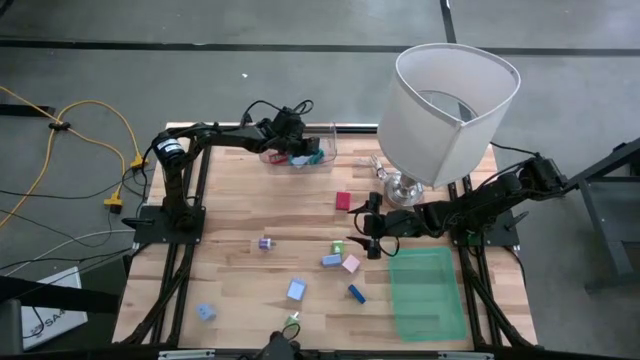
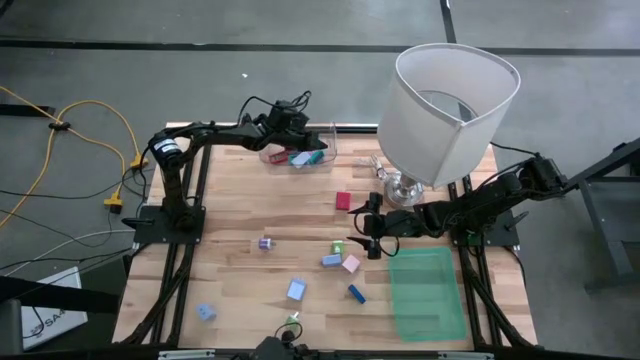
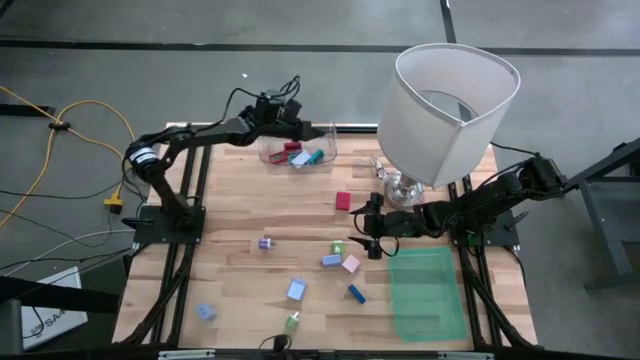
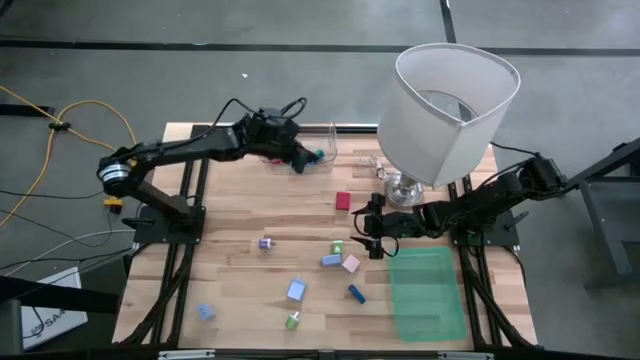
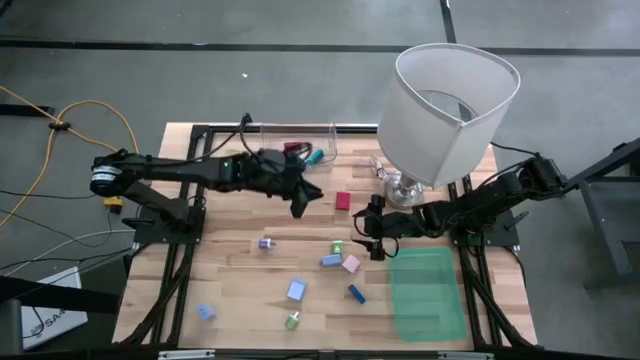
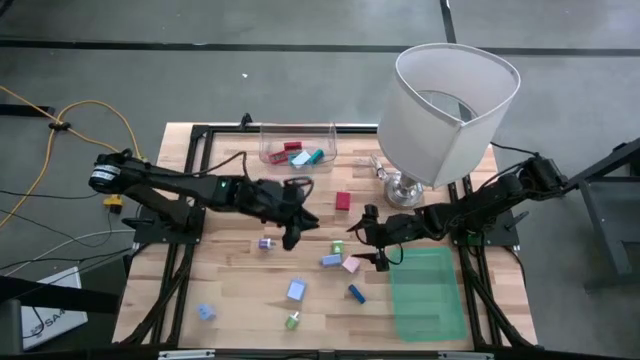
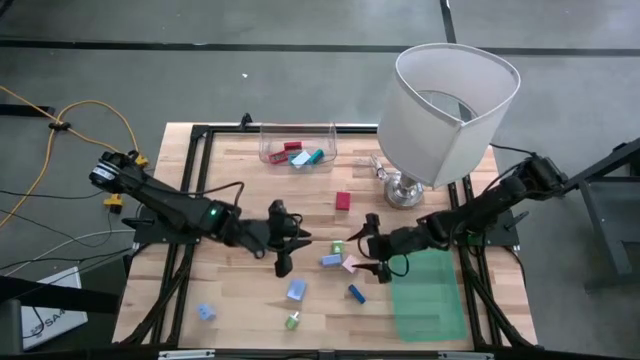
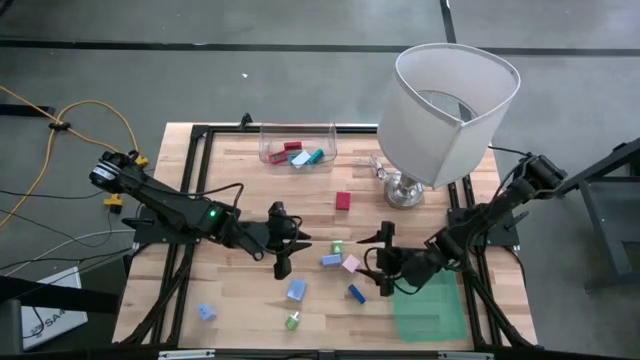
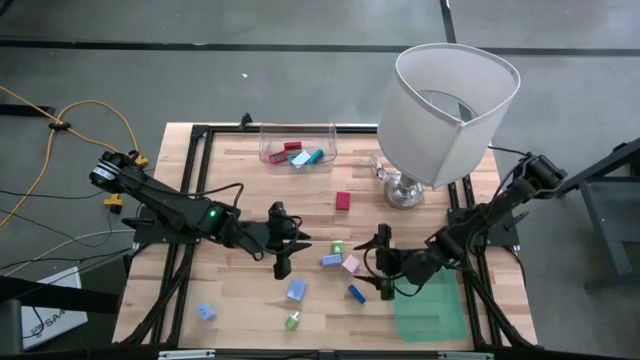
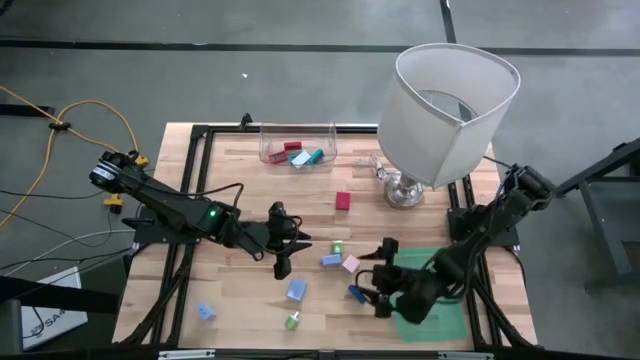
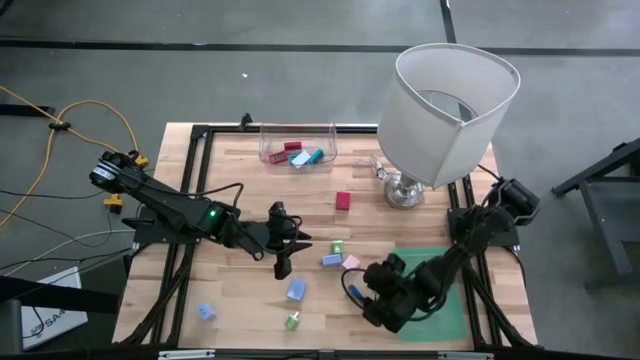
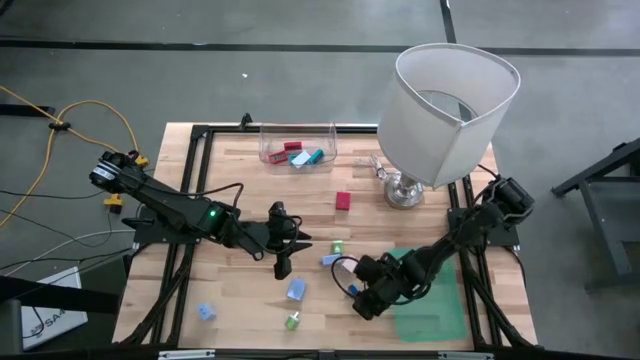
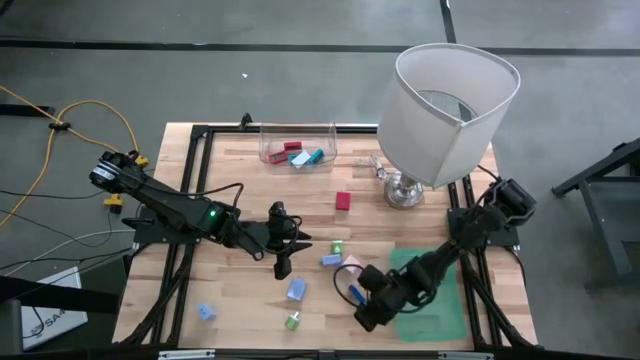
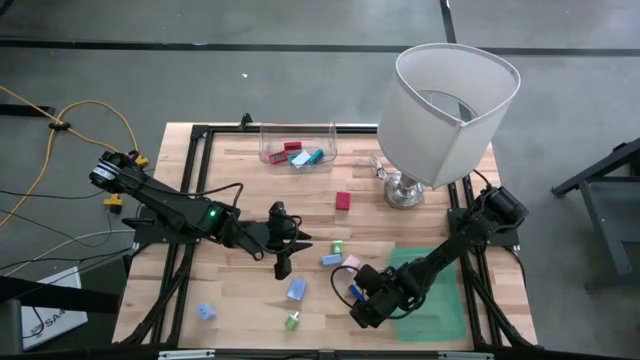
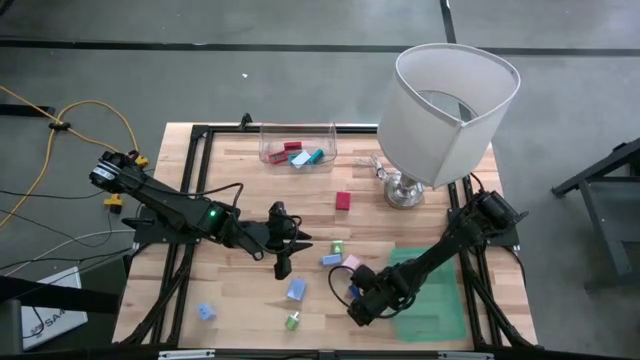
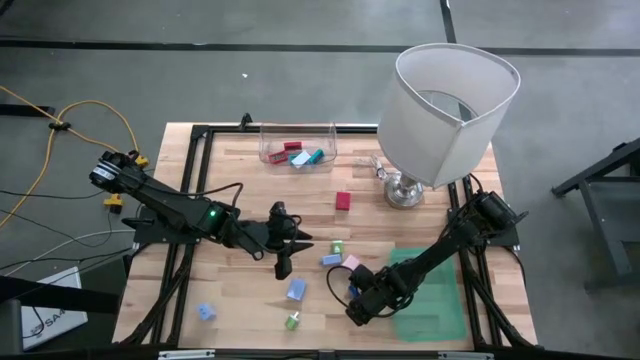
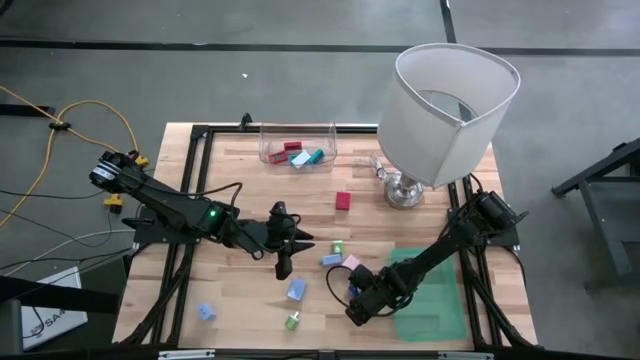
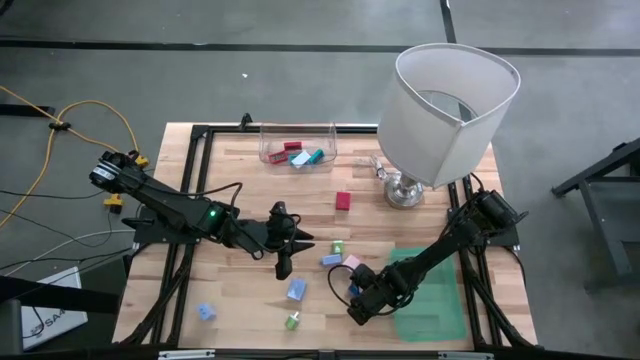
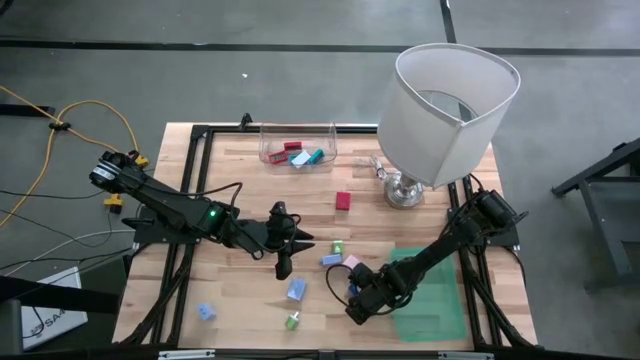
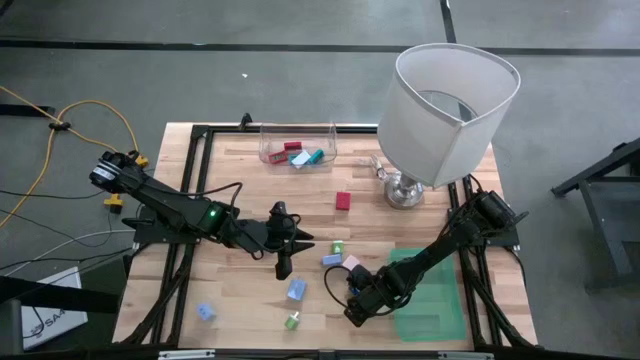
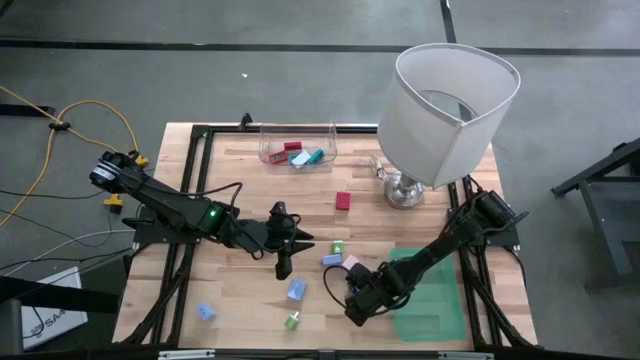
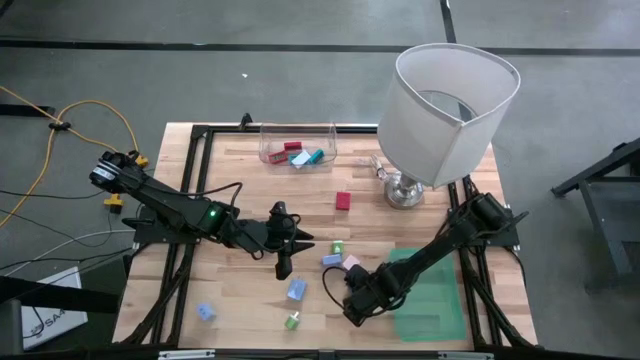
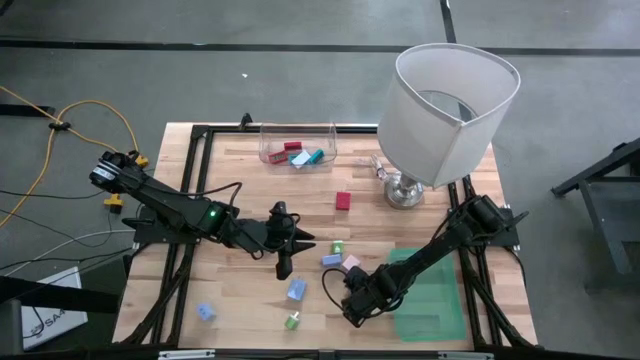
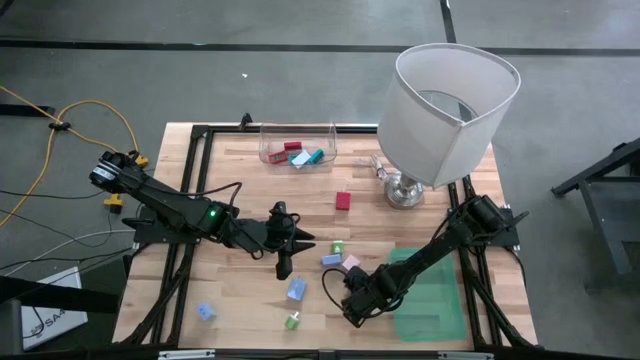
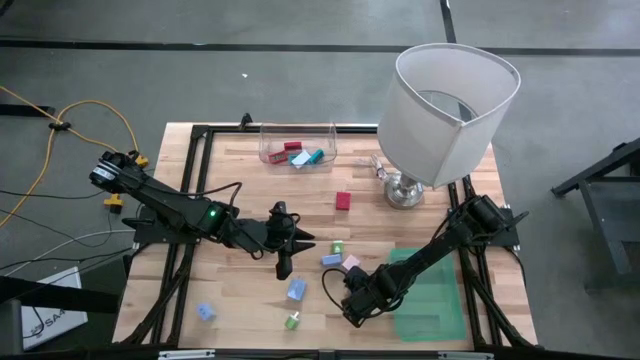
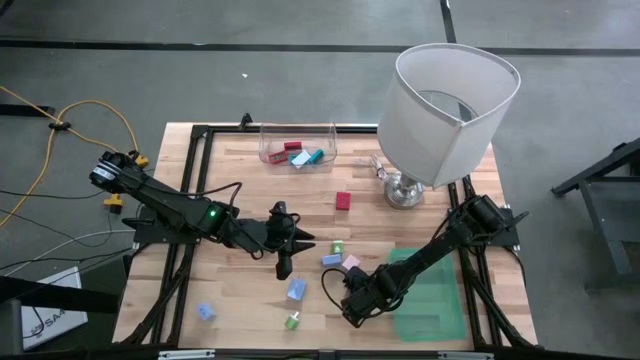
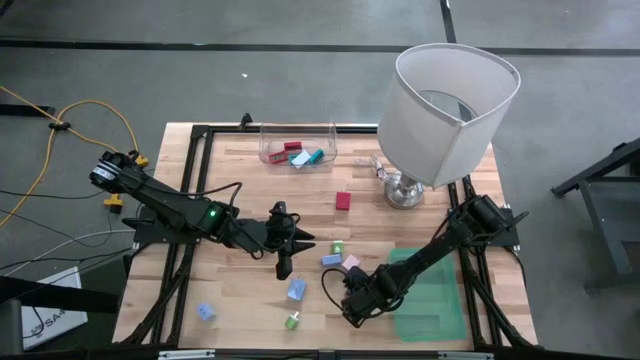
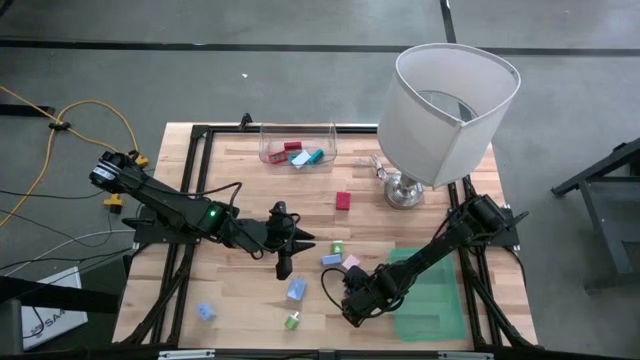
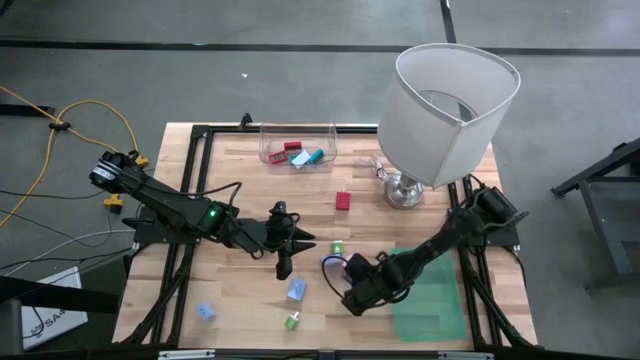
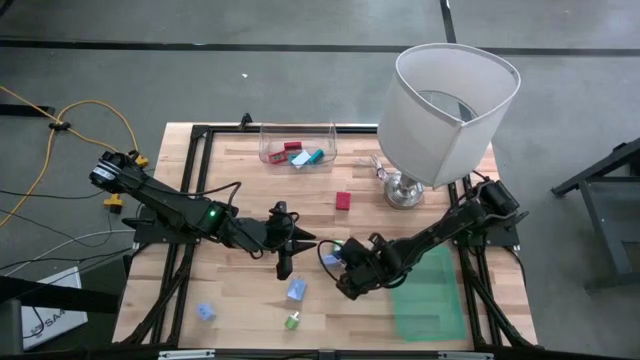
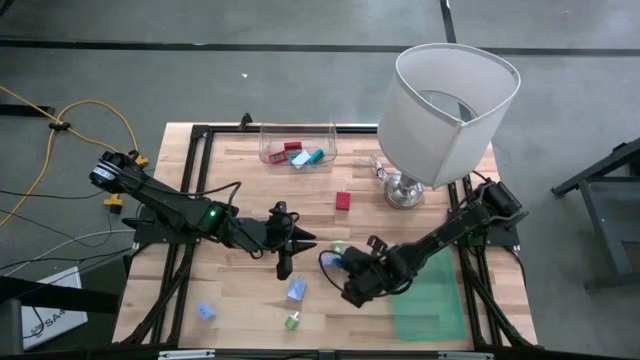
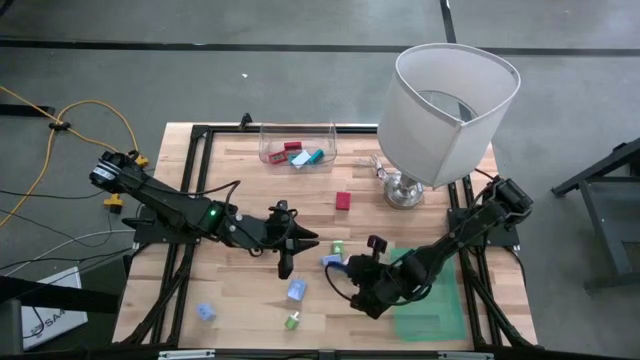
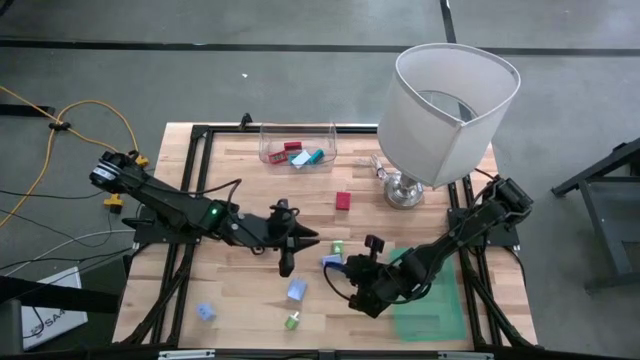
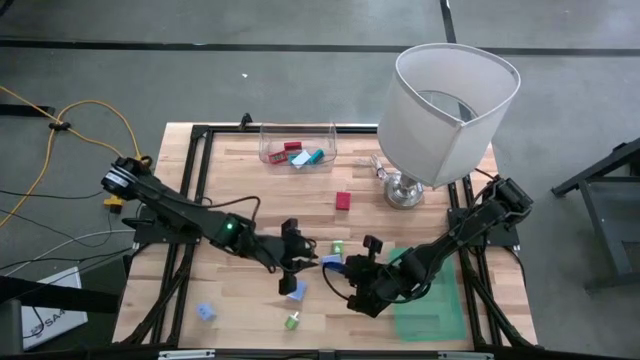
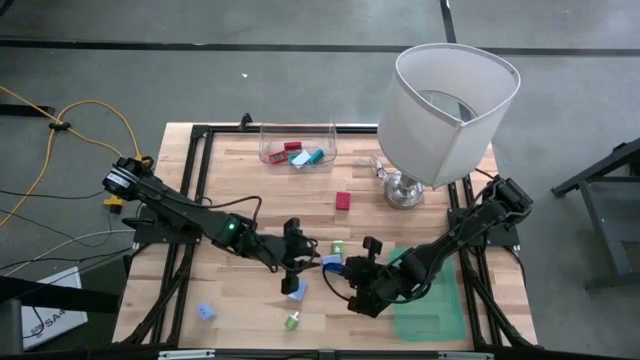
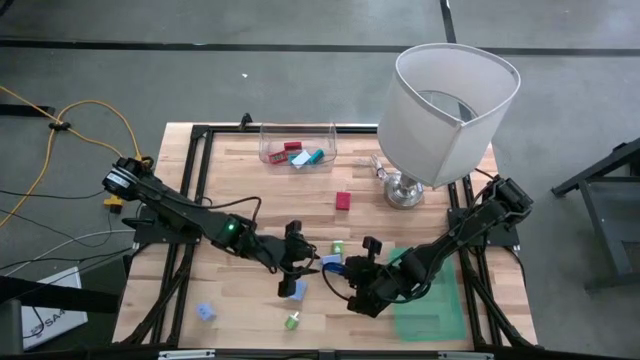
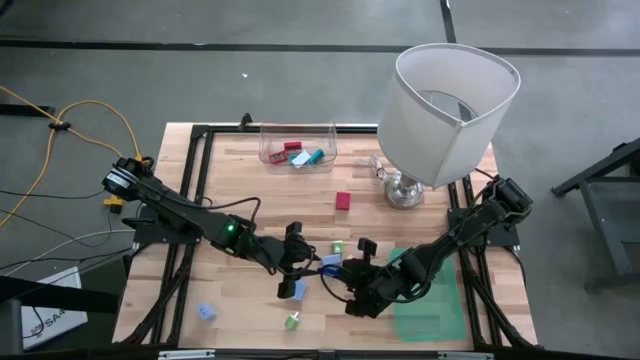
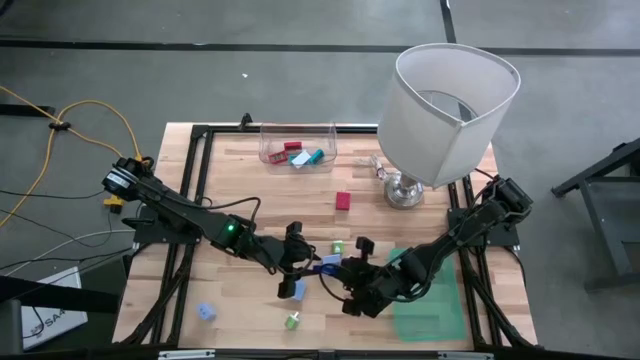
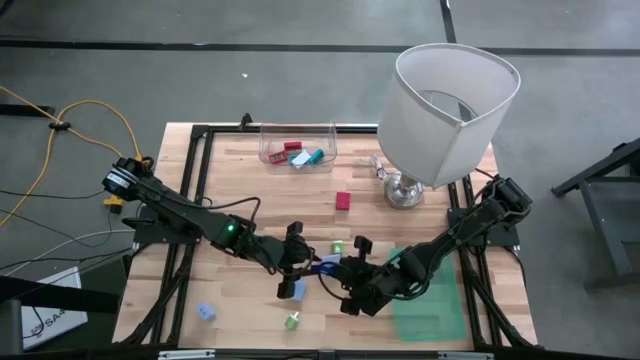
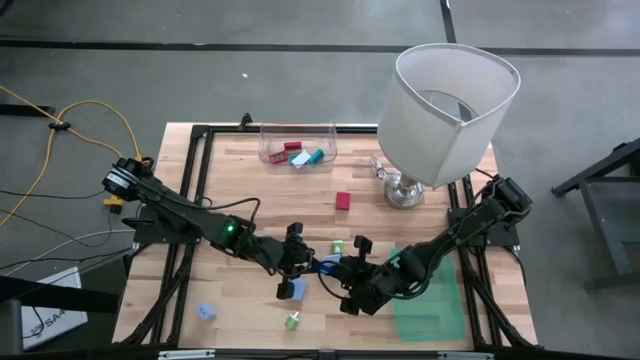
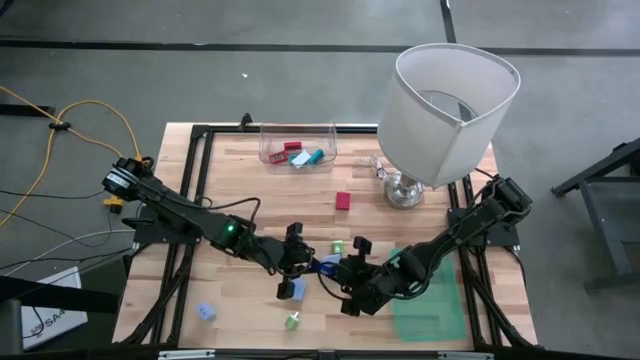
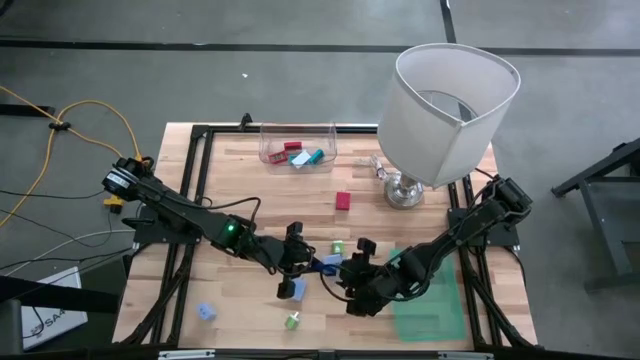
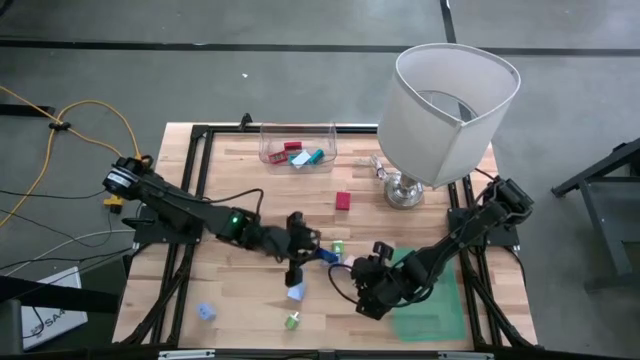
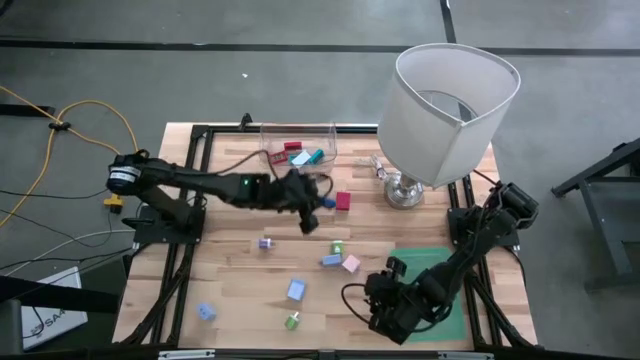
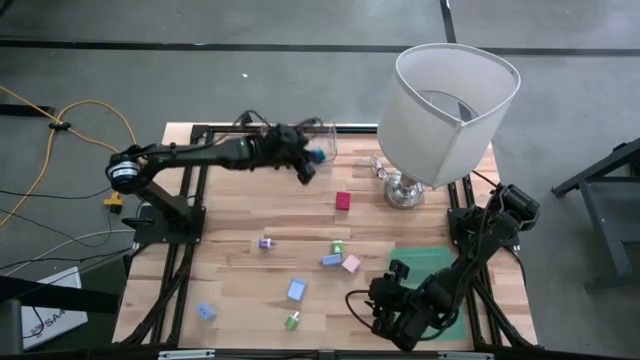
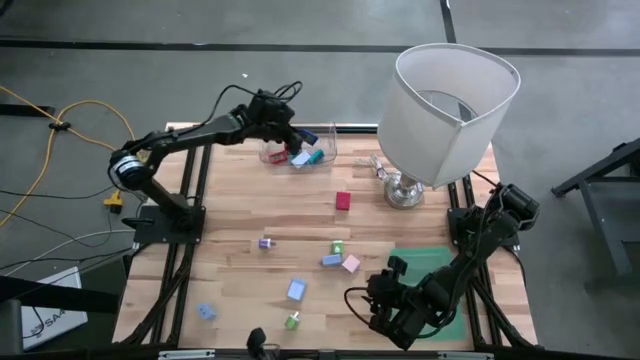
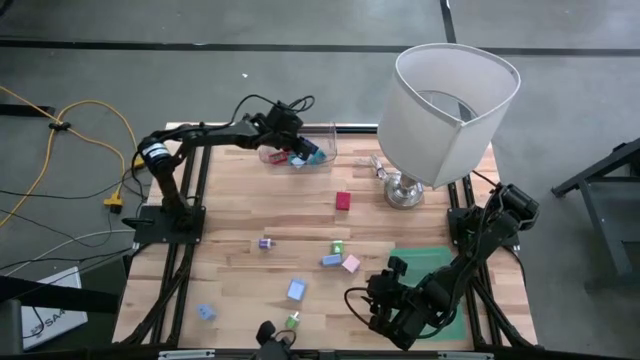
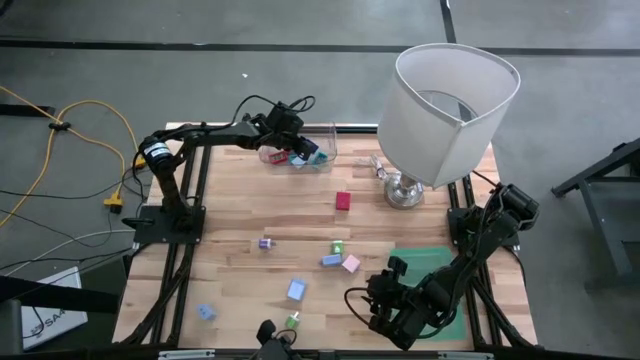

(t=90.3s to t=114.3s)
Task: Pick & Place Office items
Put the blue digital clock into the transparent bin
